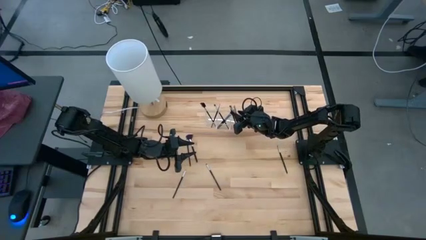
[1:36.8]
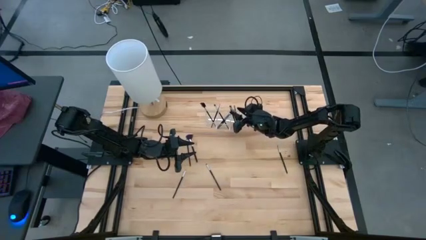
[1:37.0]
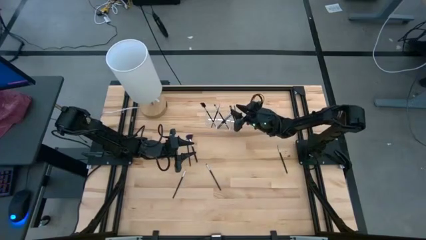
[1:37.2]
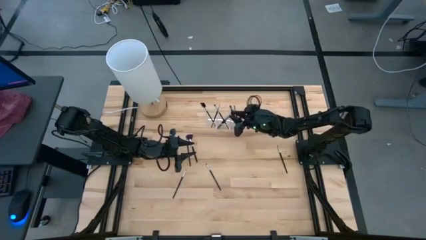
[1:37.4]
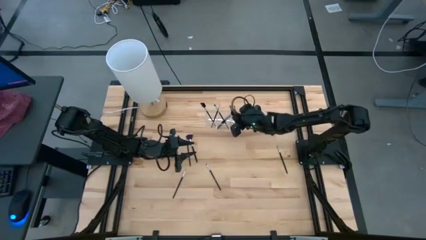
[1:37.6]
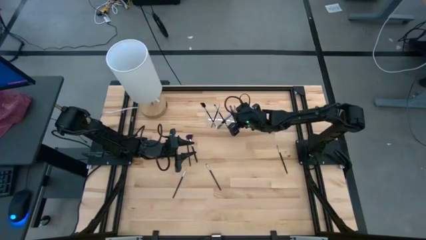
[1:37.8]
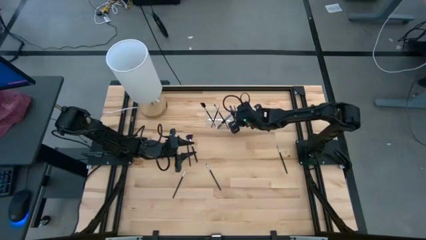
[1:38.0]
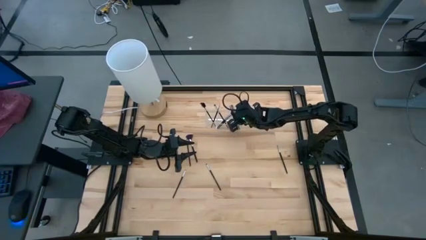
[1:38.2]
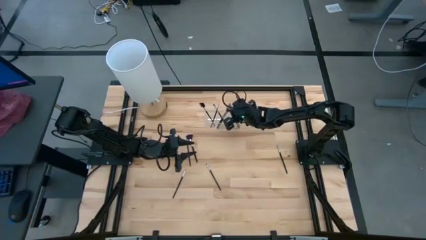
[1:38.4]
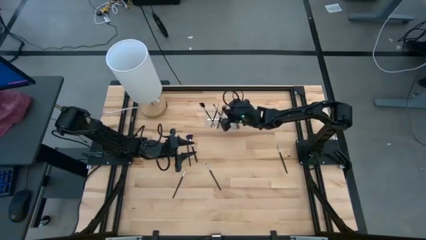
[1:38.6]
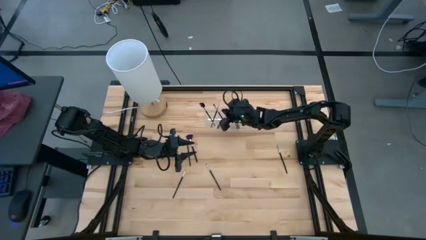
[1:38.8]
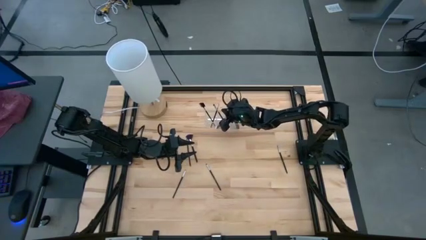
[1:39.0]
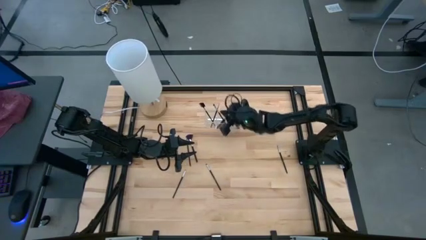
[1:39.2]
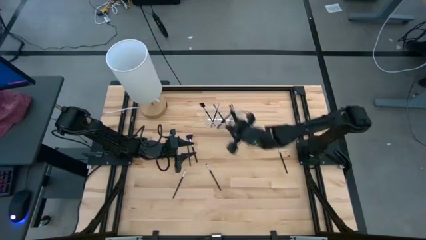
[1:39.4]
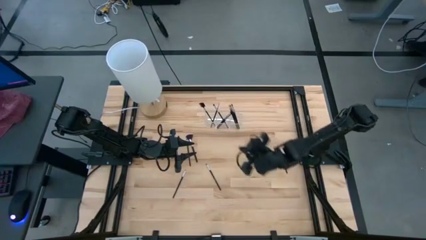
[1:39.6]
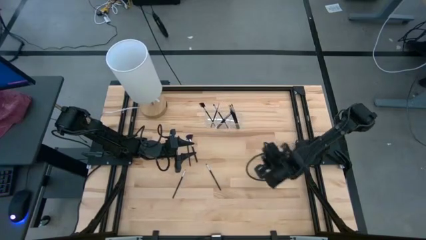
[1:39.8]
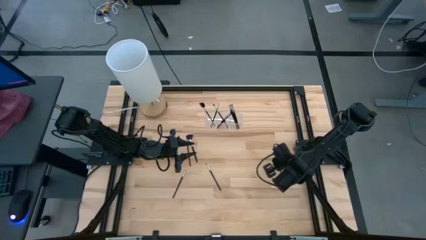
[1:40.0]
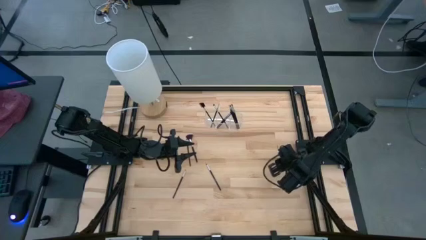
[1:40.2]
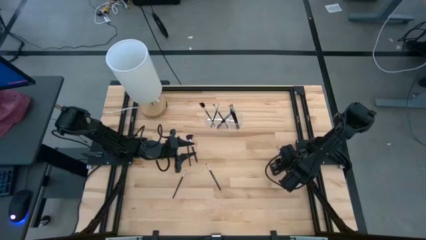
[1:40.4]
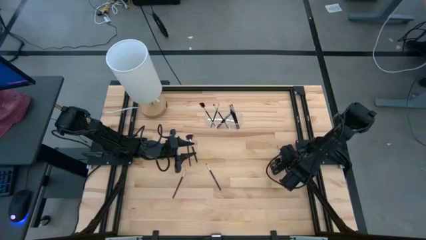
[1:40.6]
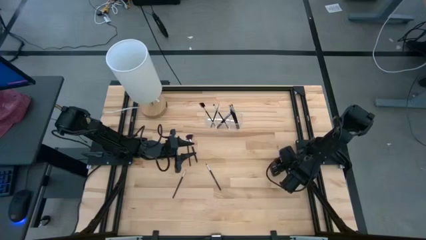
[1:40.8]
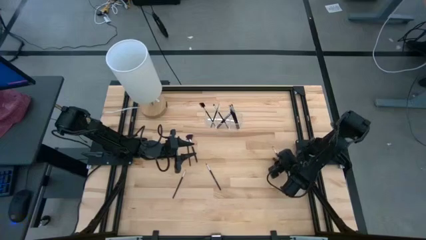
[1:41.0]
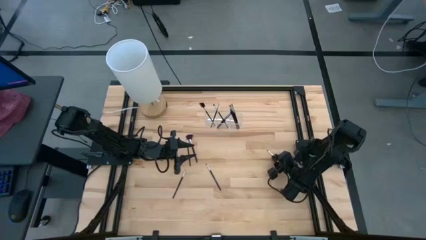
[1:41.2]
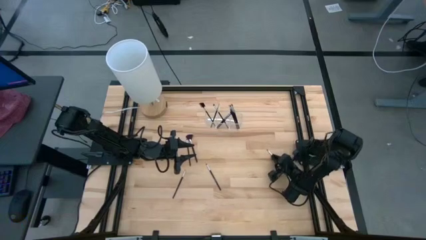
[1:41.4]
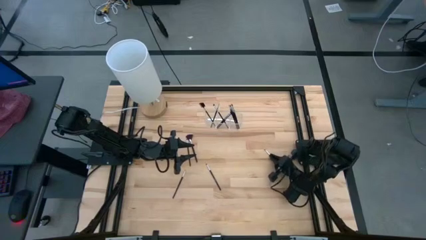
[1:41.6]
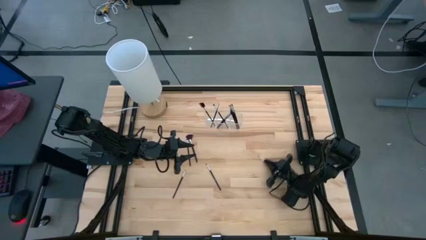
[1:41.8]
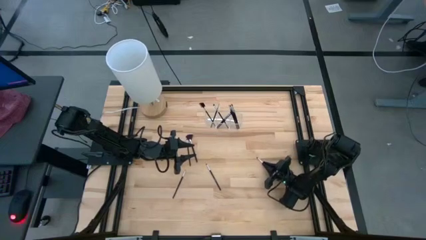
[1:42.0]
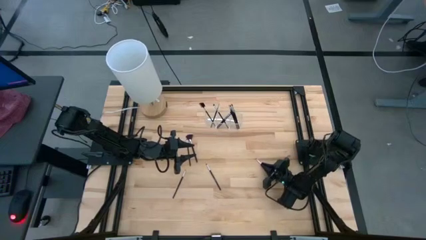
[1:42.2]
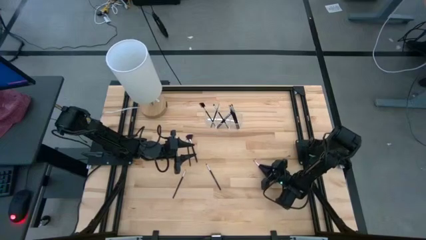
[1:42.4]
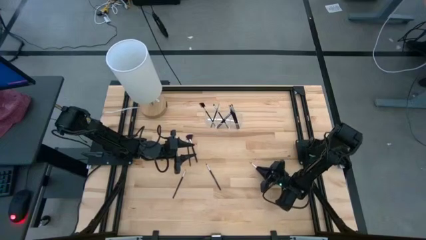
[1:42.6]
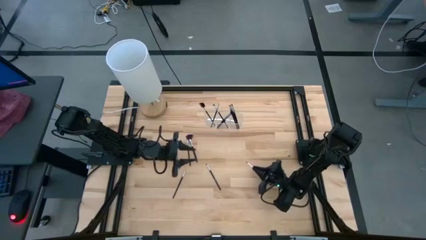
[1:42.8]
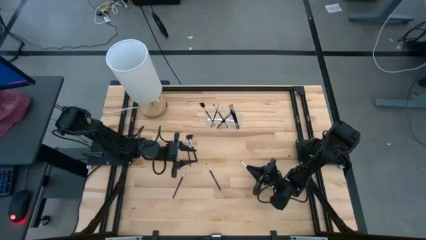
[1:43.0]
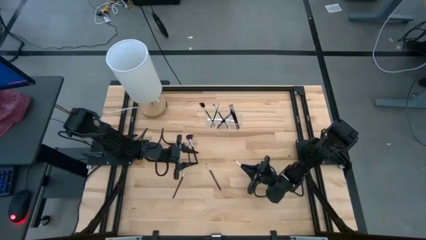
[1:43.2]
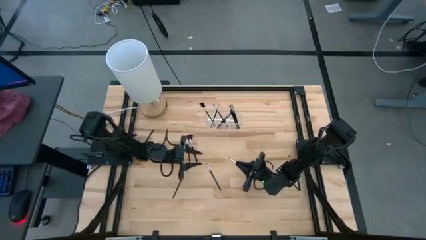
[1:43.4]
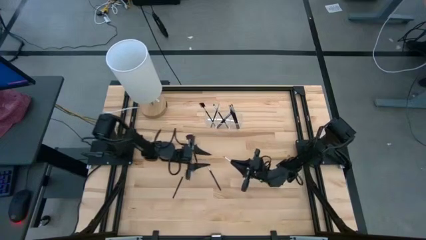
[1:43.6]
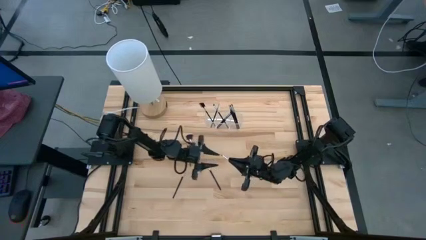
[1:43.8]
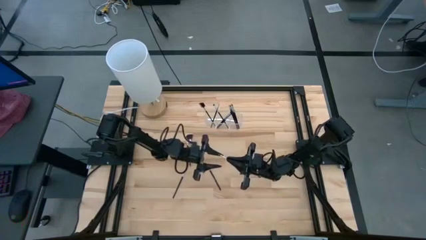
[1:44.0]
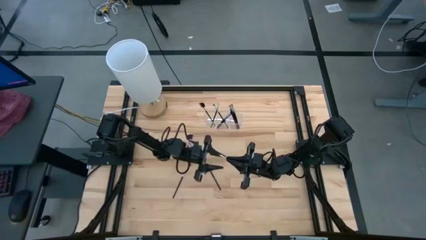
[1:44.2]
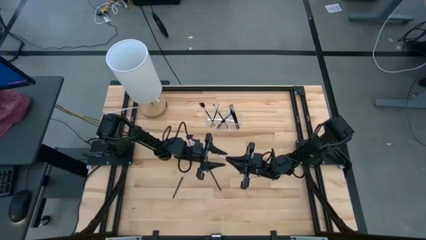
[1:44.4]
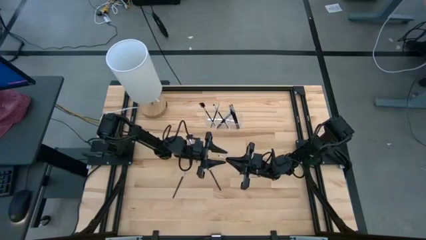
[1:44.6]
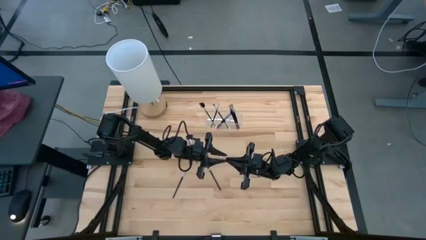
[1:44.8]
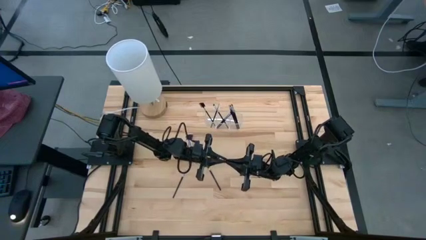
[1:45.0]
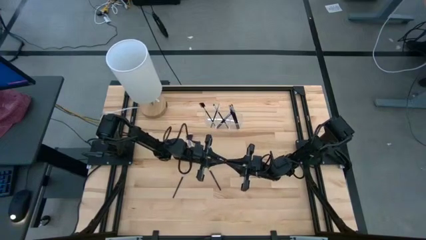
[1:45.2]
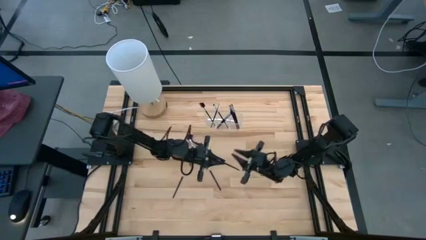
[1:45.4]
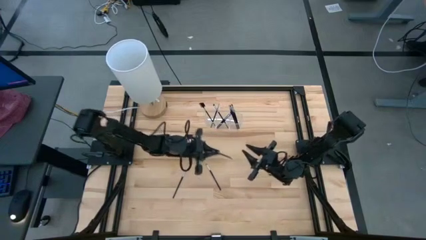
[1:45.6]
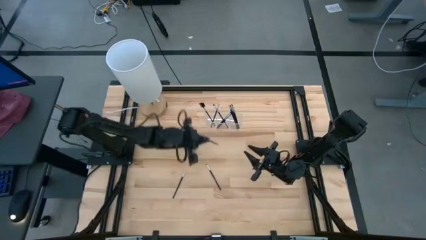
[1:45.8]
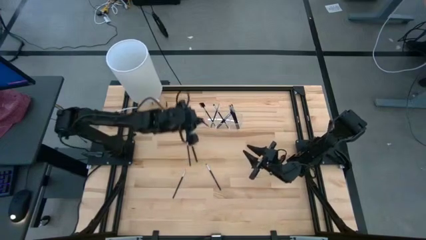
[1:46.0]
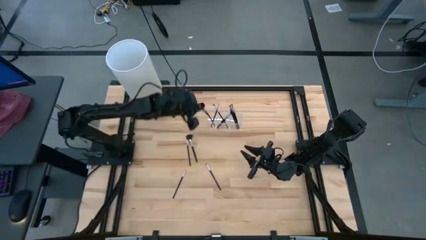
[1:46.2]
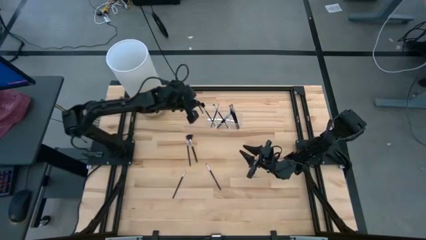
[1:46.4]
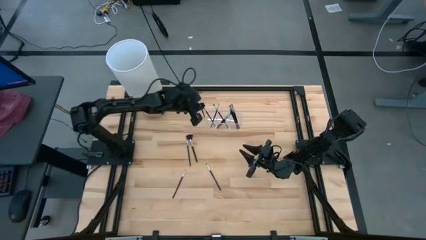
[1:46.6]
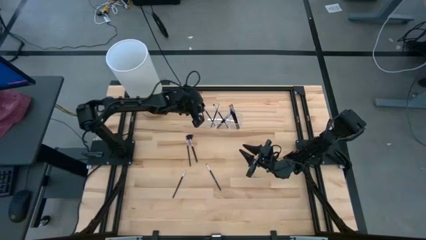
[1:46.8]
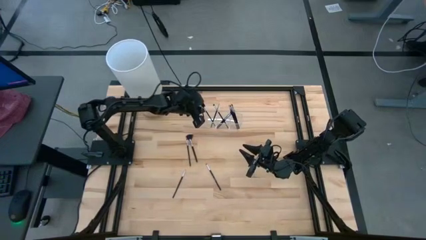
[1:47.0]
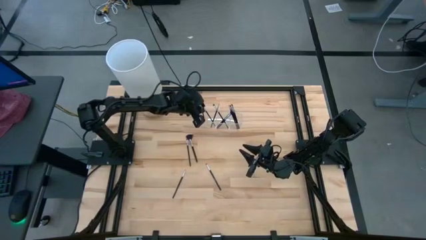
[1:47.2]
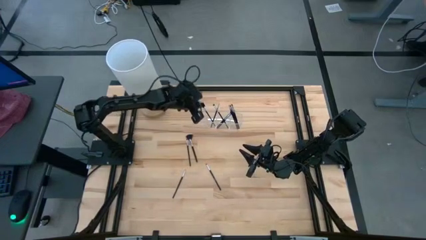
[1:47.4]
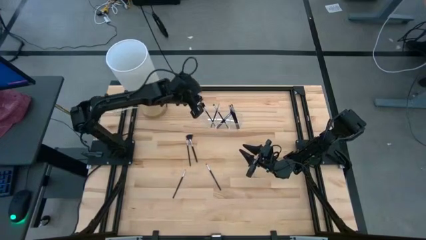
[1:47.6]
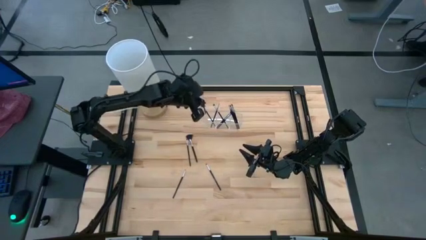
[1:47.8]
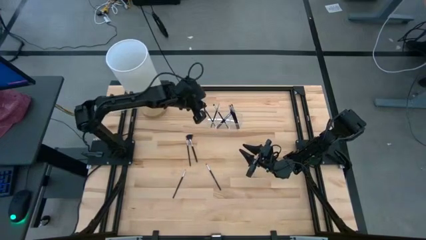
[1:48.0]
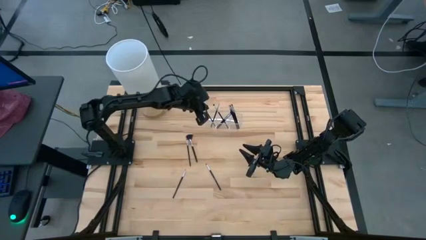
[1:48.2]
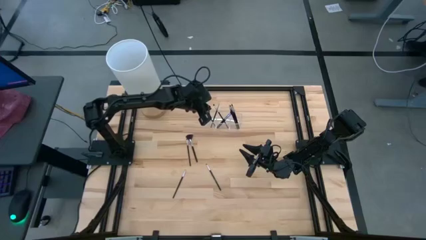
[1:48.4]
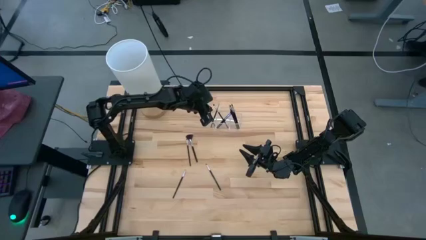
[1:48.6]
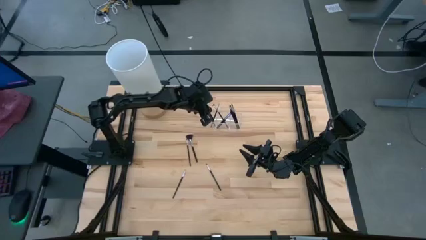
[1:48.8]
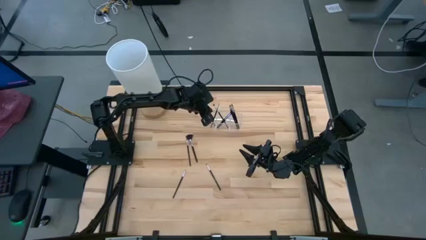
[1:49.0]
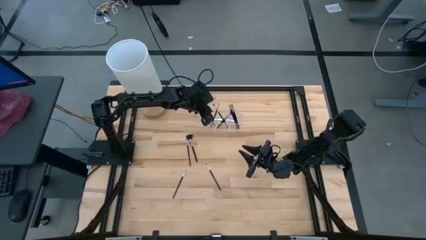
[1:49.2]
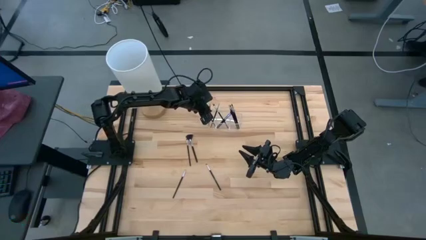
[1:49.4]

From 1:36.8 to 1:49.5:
Task: Put items in baskets/containers
Put the black eyeshadow brush into the transparent organizer

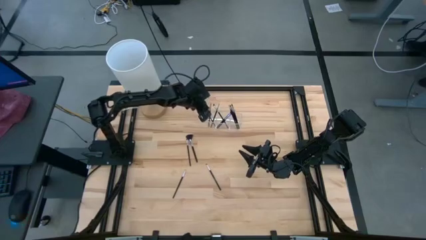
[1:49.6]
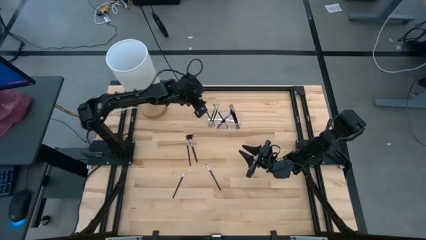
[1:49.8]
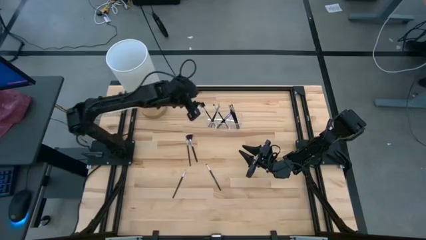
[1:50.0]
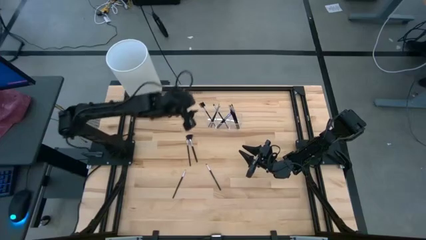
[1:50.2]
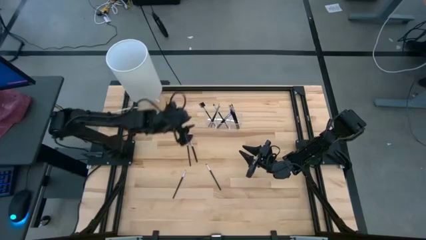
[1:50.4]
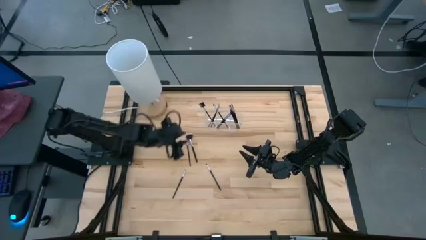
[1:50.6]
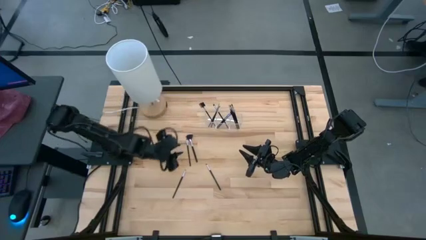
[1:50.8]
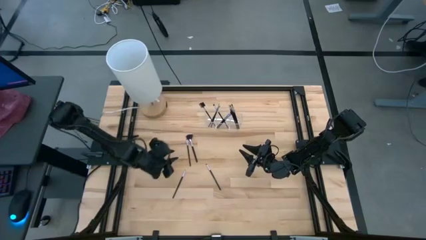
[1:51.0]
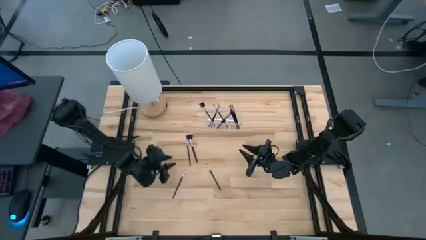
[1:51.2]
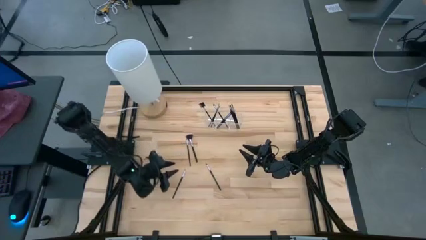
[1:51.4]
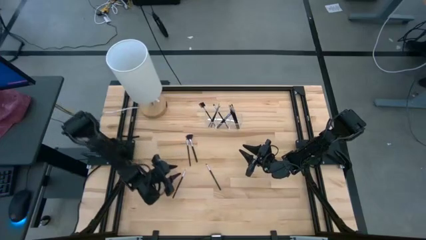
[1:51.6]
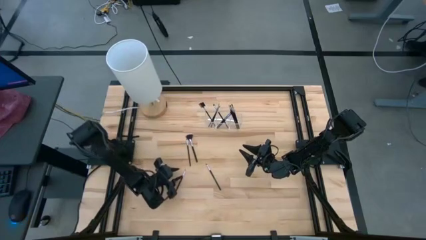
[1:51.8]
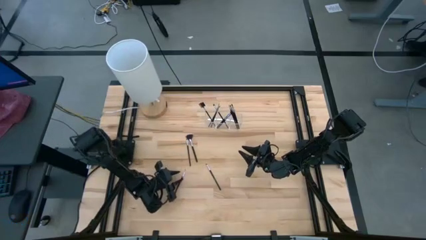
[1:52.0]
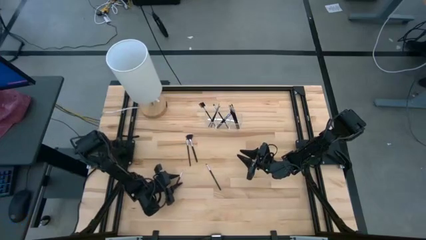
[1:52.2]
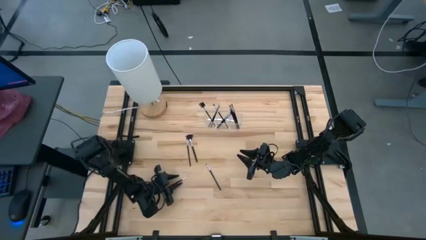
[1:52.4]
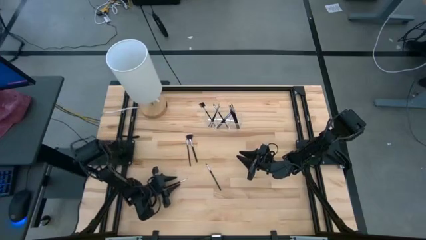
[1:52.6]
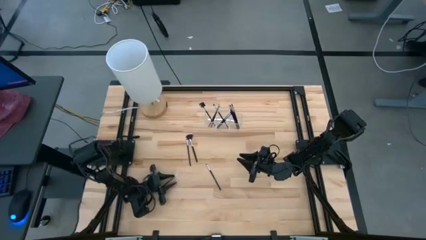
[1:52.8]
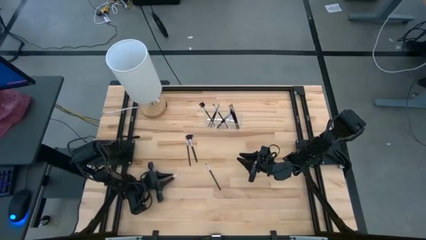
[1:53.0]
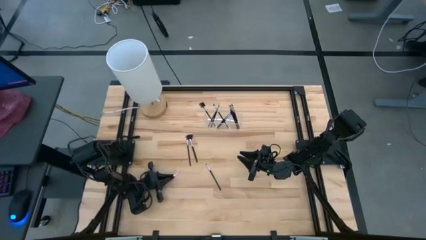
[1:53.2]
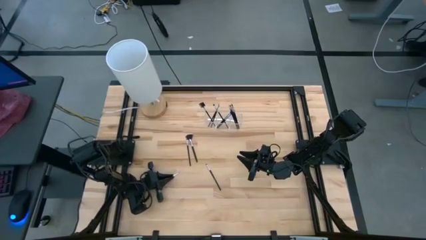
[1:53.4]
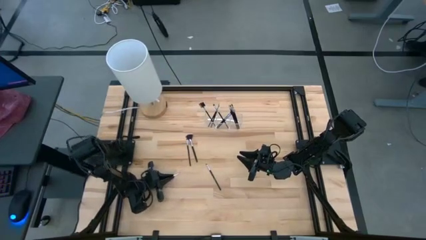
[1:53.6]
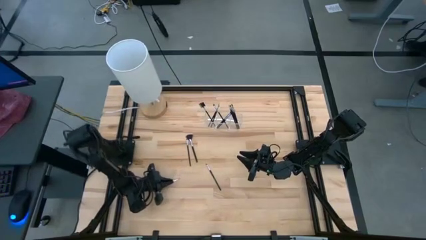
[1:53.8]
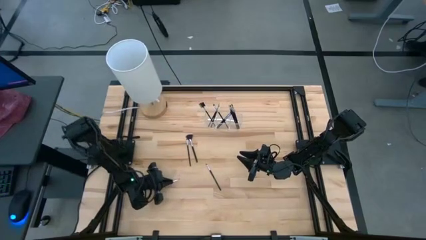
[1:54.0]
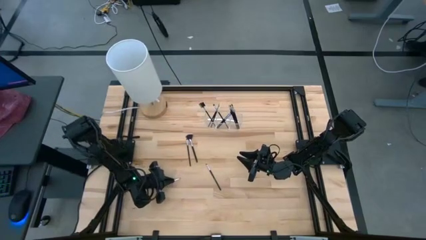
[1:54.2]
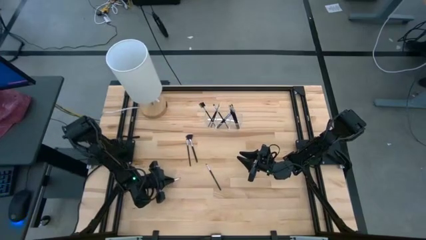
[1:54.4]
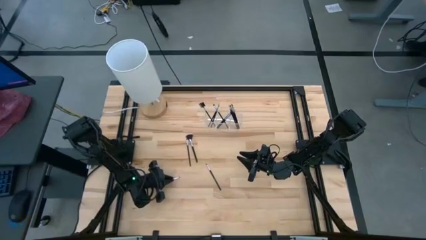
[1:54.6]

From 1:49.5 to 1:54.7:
Put the black liner brush into the transparent organizer
